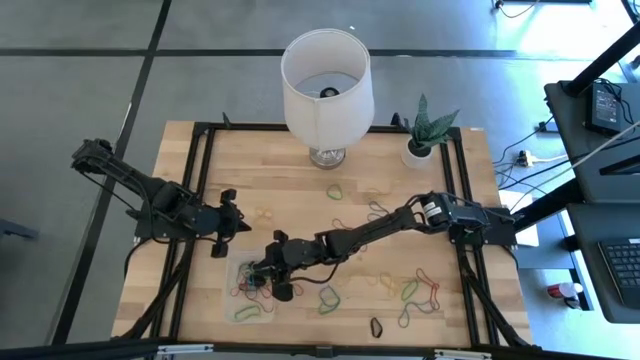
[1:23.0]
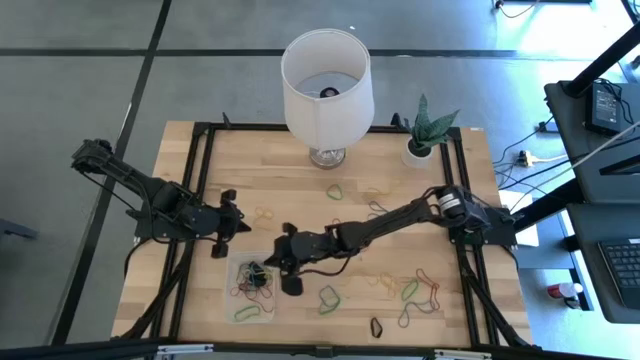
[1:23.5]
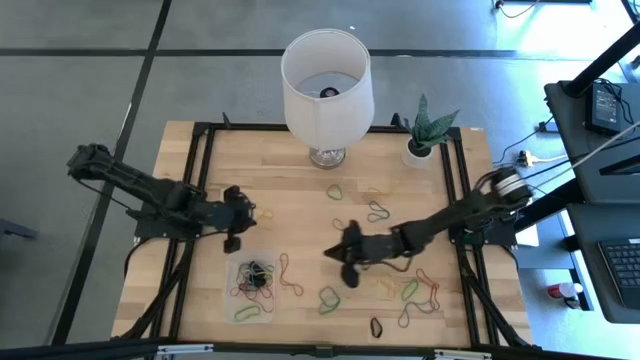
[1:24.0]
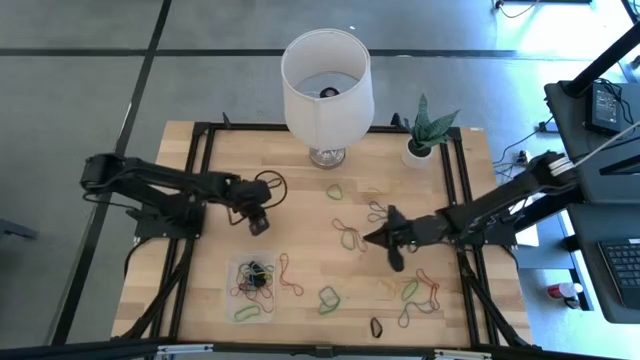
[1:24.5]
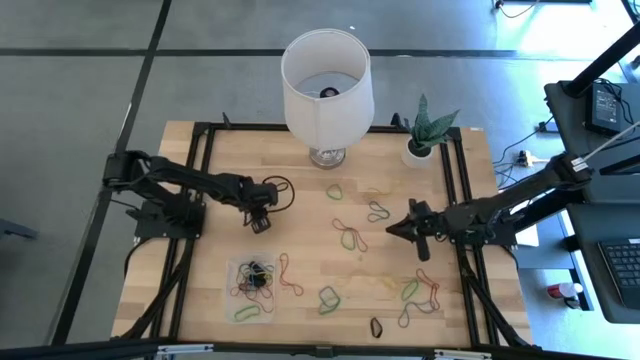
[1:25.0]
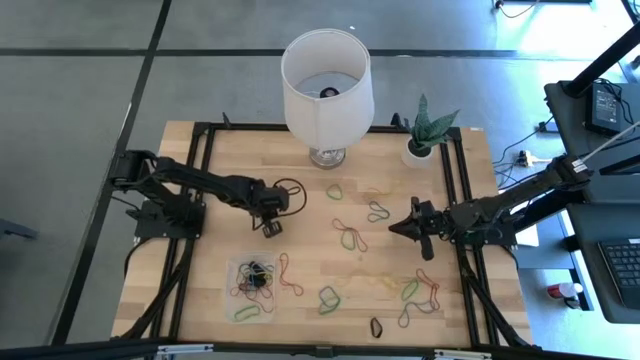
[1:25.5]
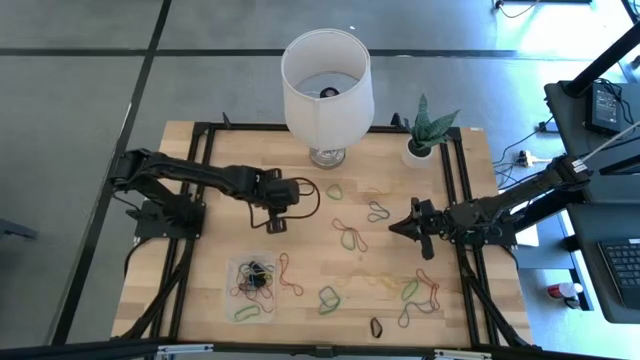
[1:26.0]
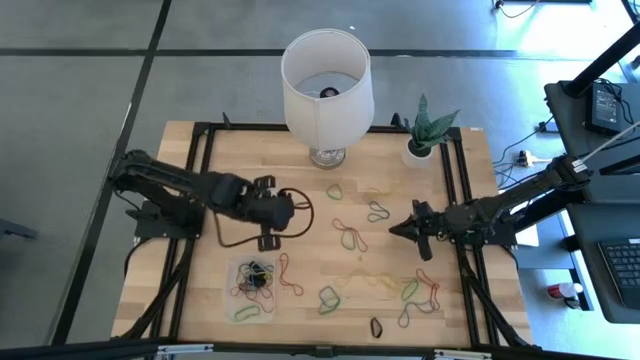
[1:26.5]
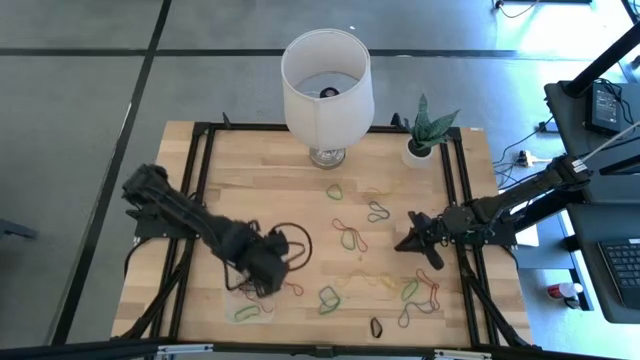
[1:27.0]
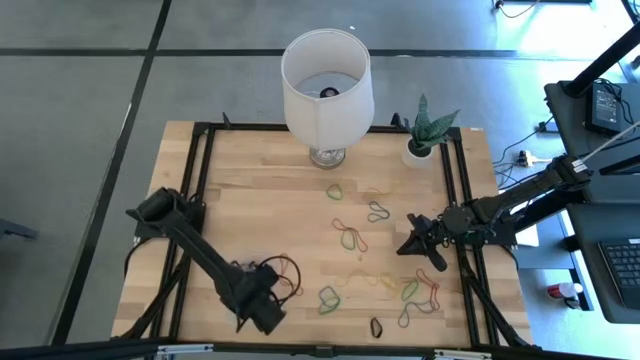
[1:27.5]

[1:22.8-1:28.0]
Task: Pick and place rubber bands into bin
Put the yellow rubber band into the transparent bin

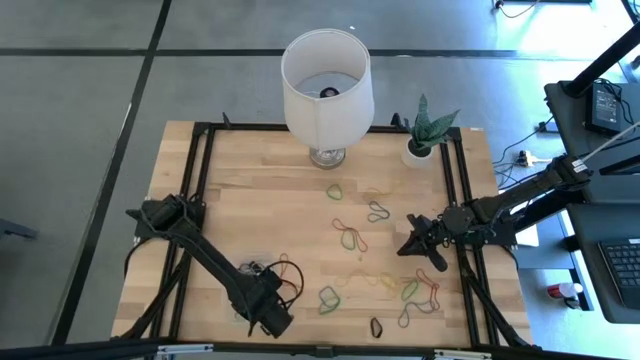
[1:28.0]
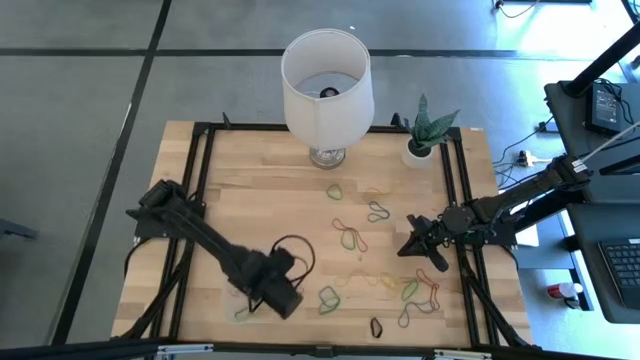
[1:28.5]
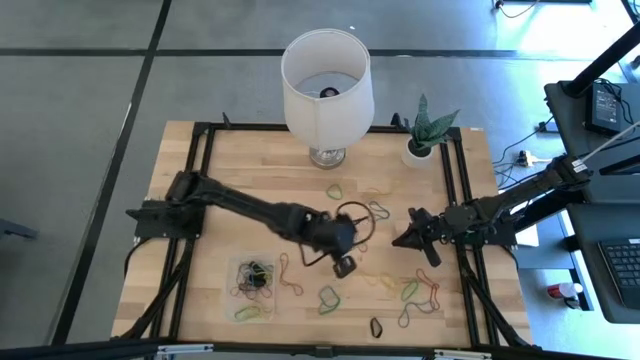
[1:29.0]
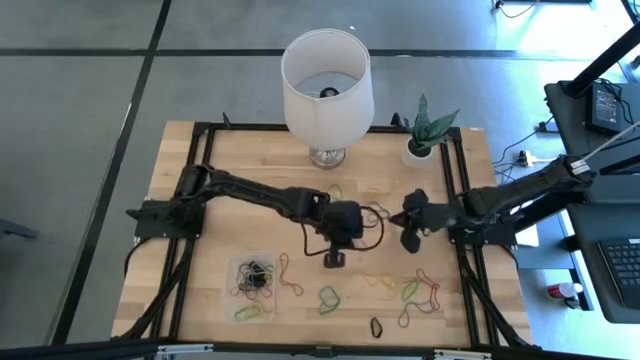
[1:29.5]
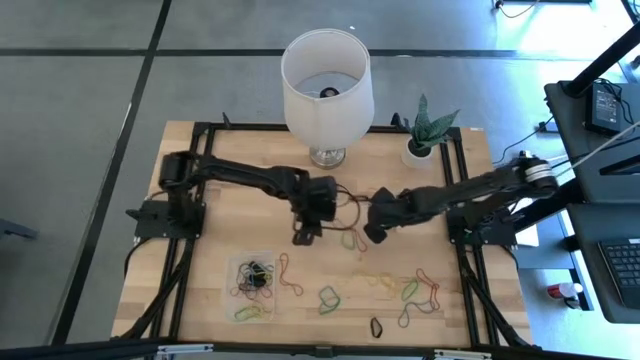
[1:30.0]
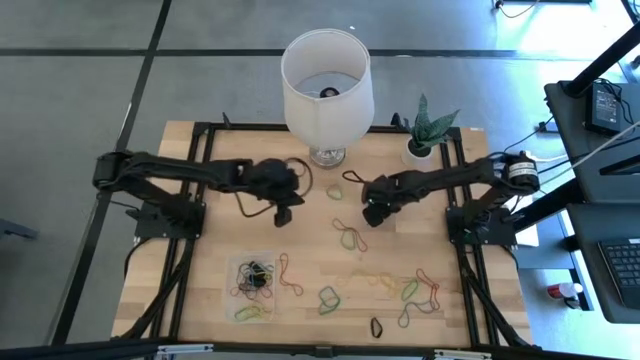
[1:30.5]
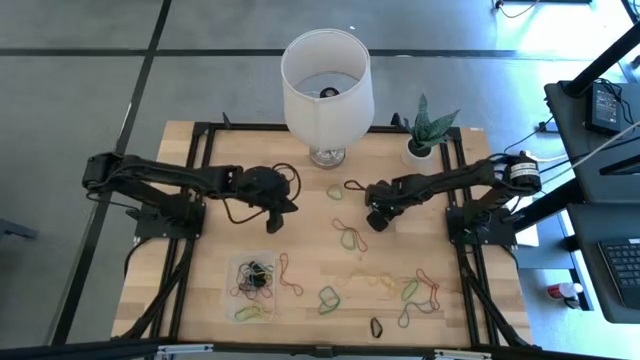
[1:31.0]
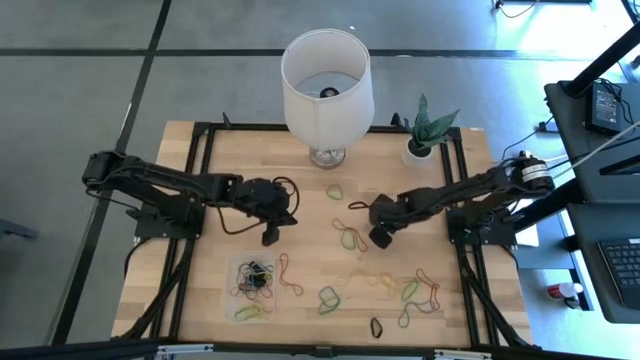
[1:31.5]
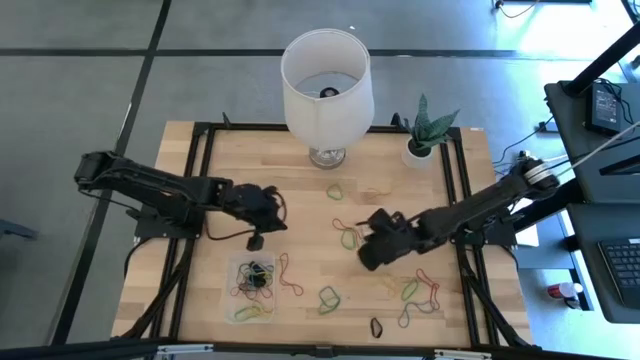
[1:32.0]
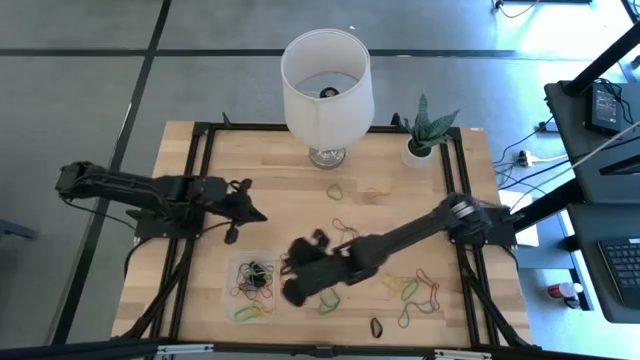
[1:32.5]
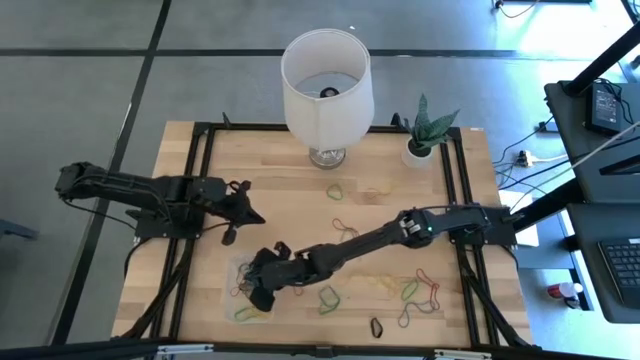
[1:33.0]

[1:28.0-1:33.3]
Put the large blue rubber band into the transparent bin

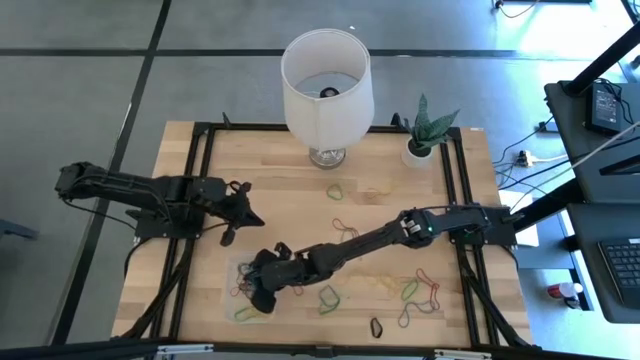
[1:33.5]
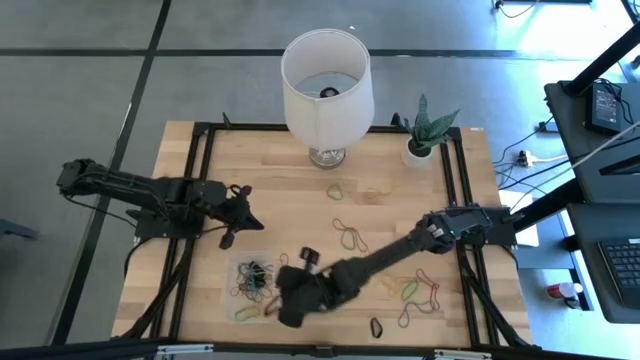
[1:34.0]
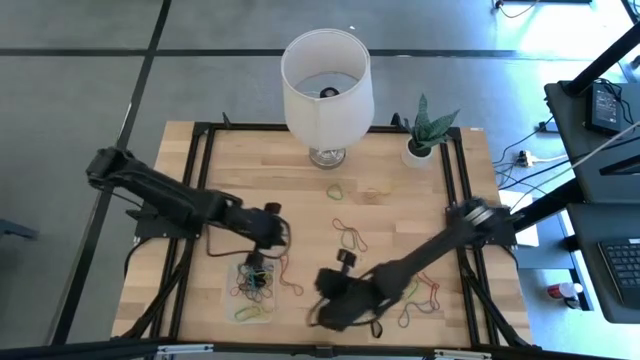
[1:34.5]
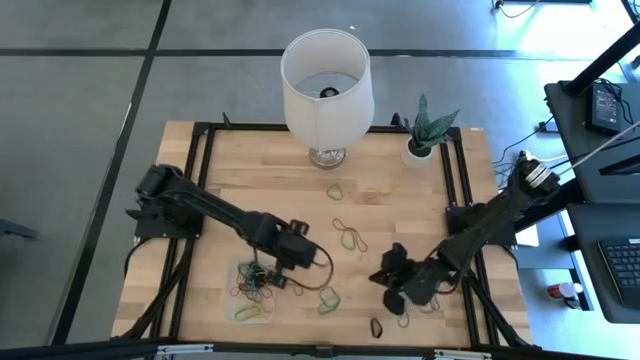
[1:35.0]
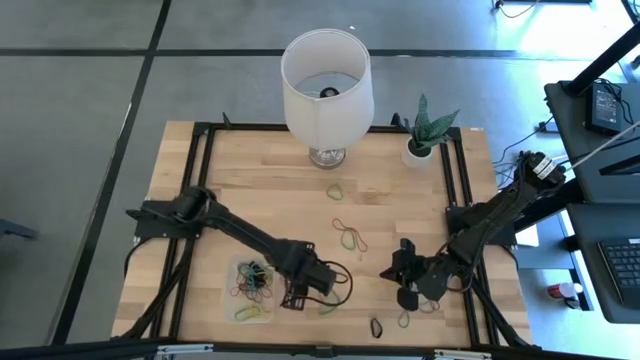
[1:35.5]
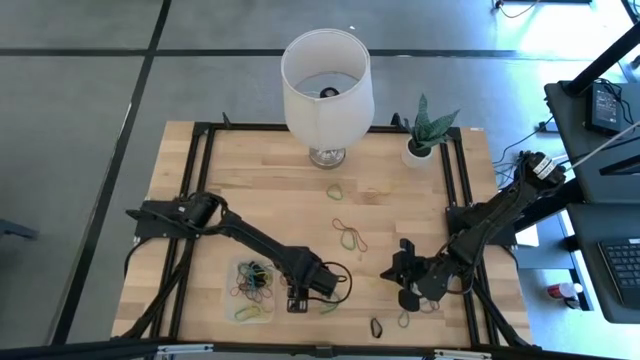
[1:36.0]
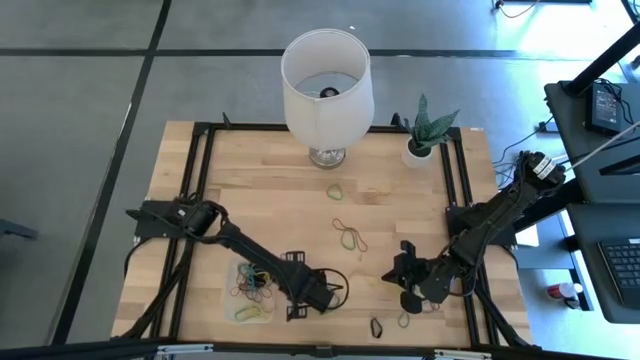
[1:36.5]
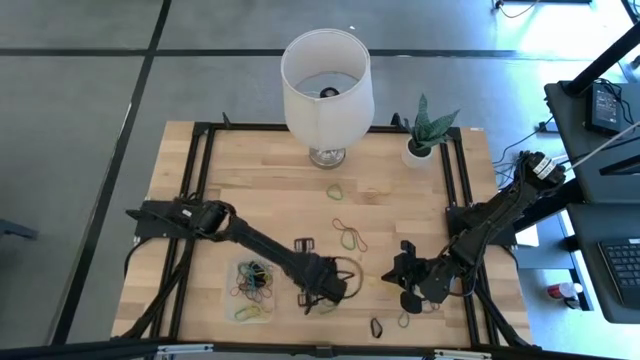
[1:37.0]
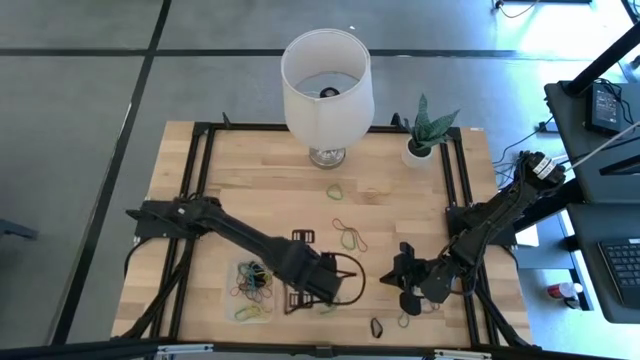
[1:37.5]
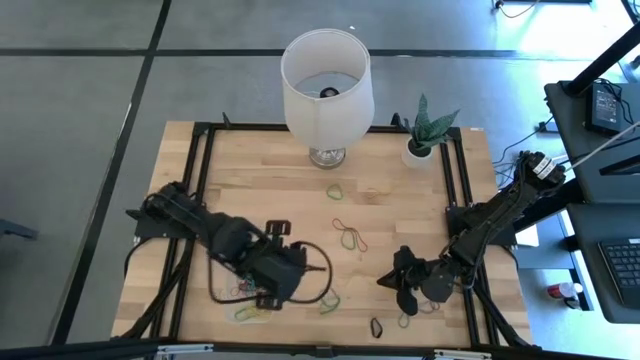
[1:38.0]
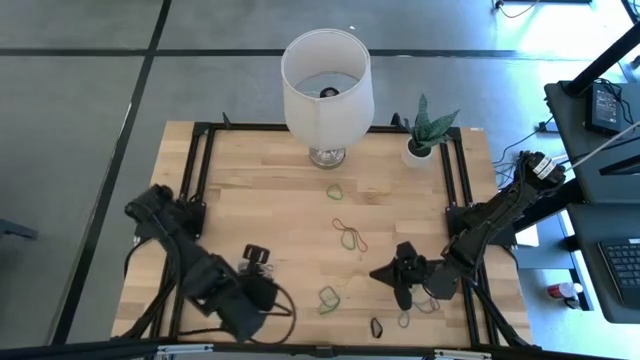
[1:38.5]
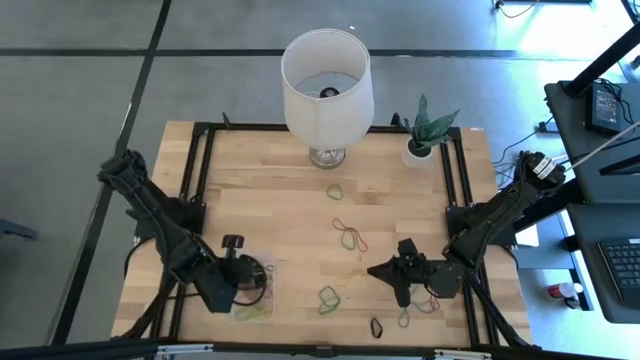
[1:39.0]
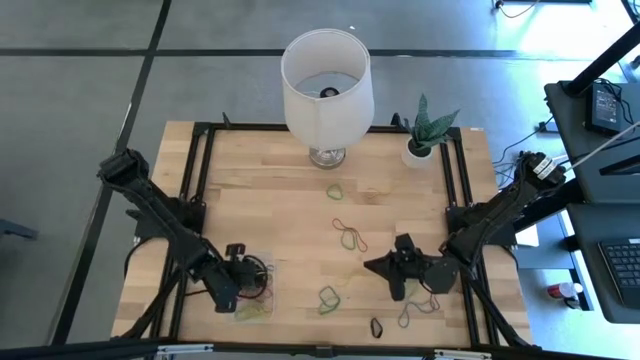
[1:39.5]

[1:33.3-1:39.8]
Put the red rubber band into the transparent bin

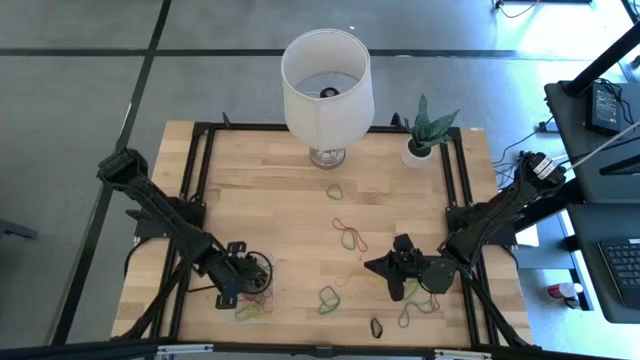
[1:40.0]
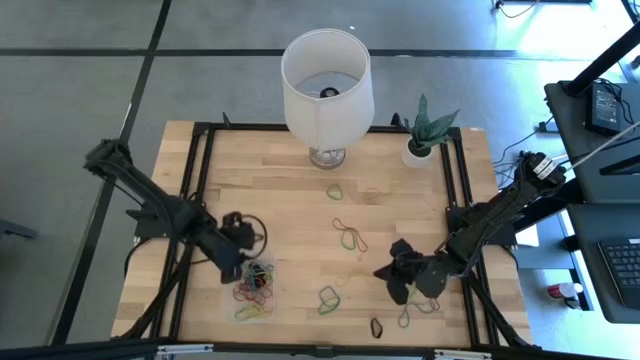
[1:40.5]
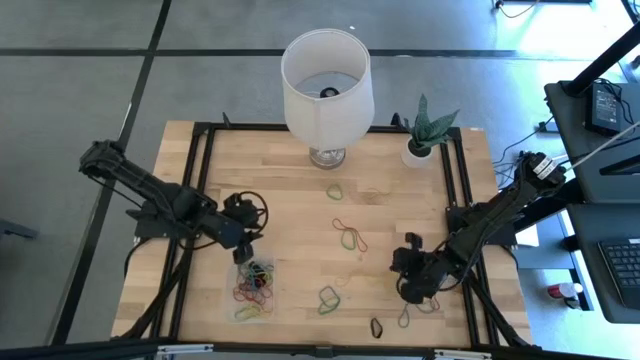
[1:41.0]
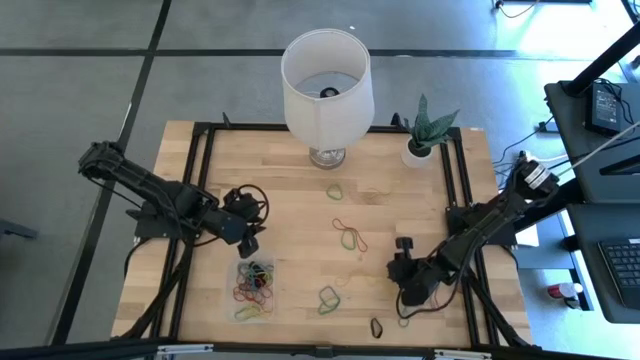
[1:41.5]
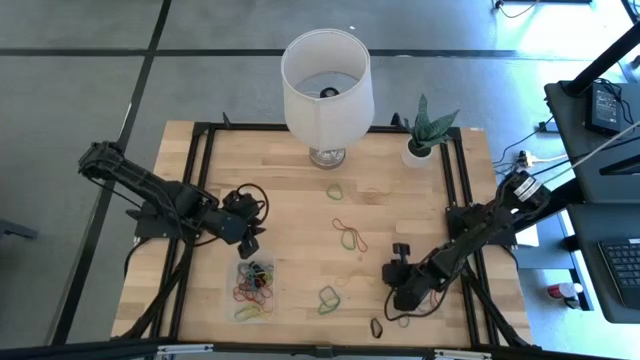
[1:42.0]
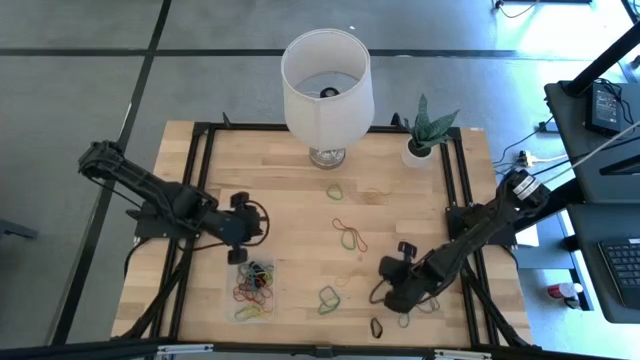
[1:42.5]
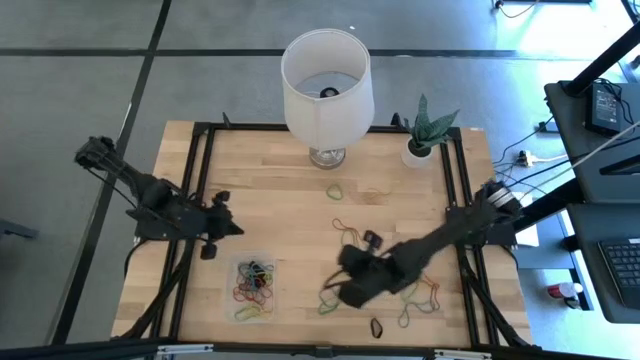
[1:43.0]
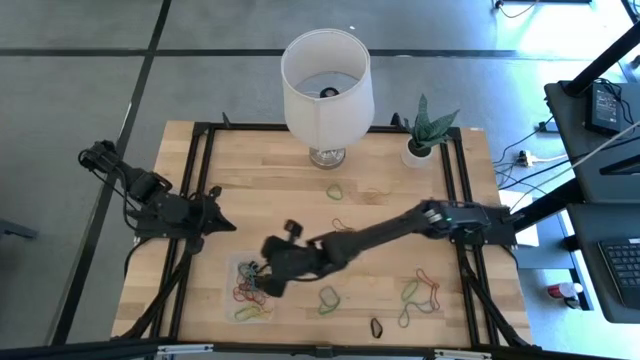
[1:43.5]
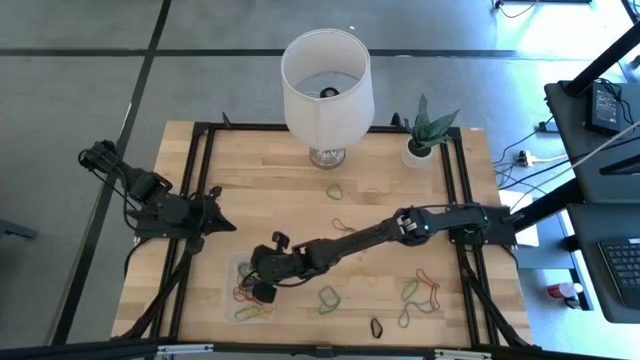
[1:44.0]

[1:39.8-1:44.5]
Put the yellow rubber band into the transparent bin
